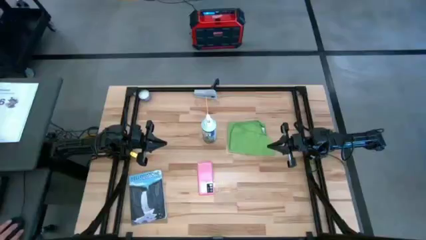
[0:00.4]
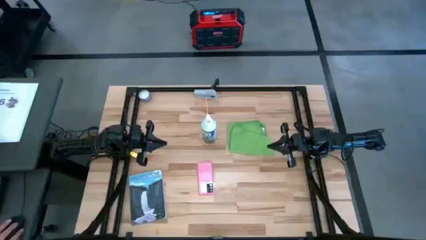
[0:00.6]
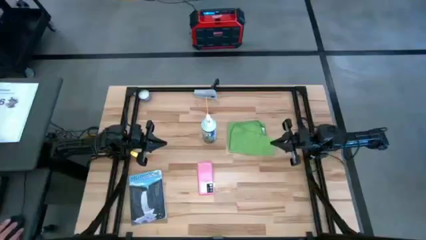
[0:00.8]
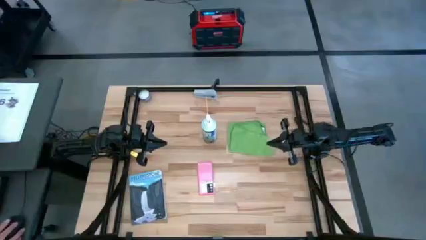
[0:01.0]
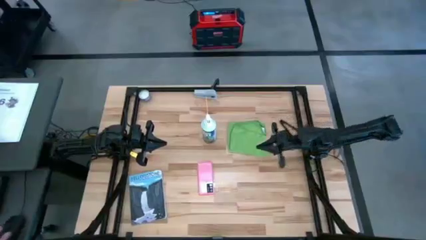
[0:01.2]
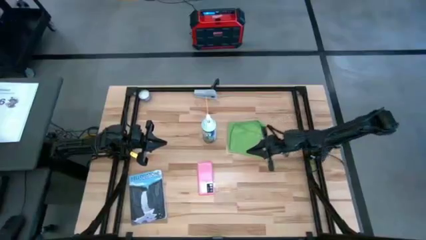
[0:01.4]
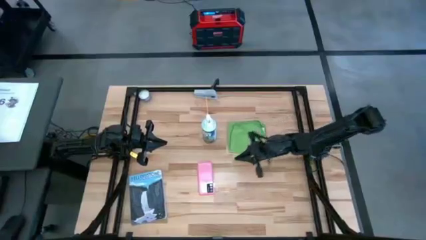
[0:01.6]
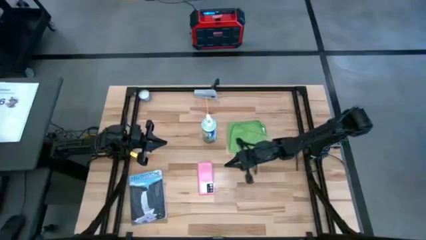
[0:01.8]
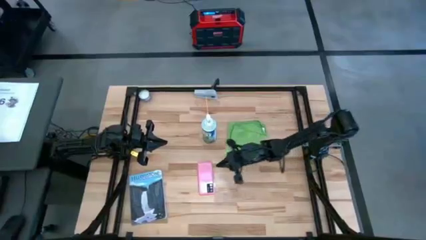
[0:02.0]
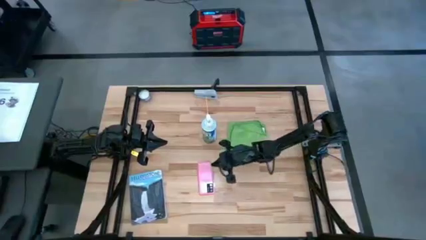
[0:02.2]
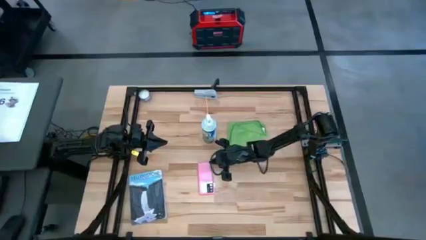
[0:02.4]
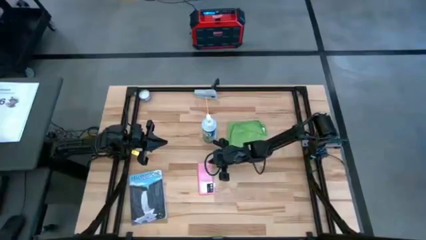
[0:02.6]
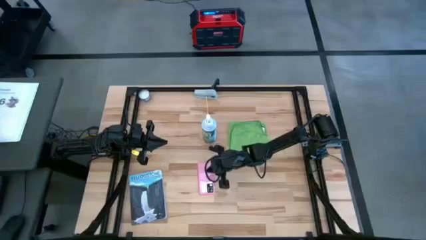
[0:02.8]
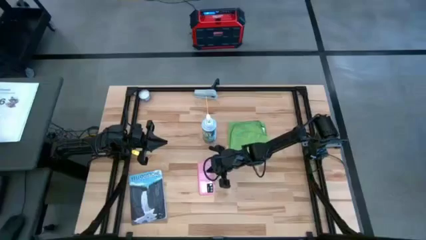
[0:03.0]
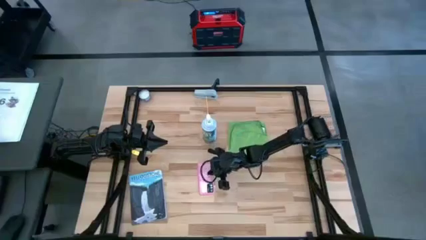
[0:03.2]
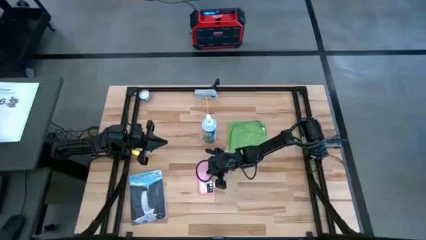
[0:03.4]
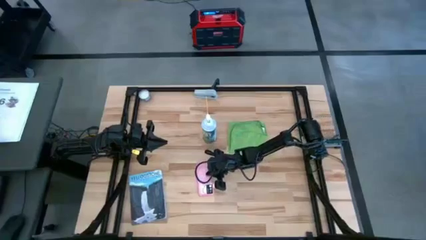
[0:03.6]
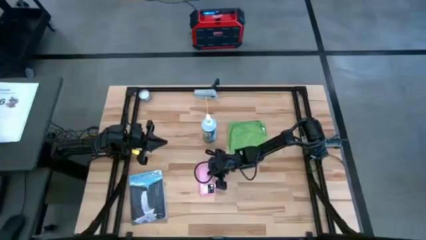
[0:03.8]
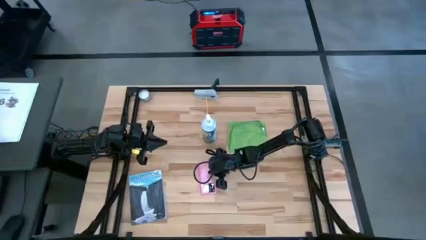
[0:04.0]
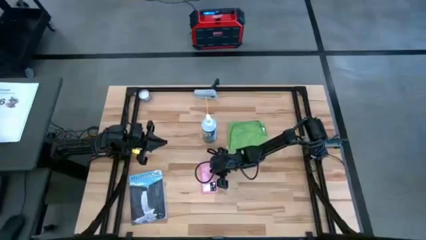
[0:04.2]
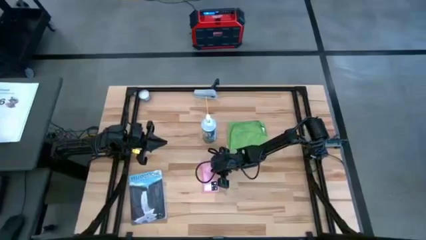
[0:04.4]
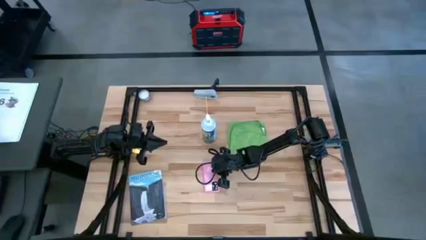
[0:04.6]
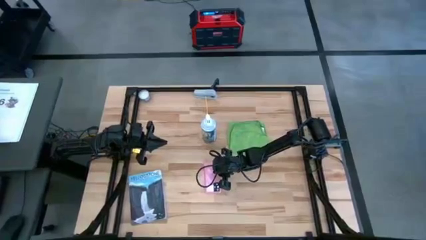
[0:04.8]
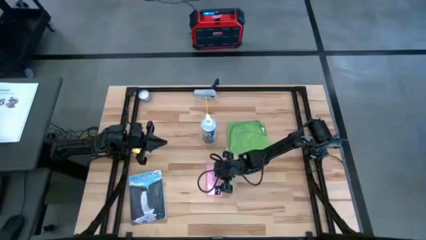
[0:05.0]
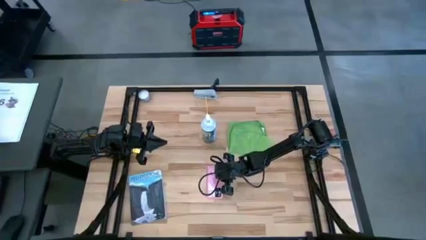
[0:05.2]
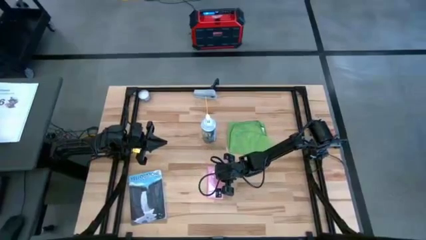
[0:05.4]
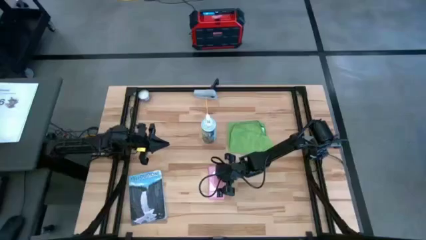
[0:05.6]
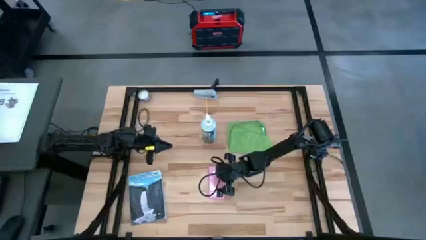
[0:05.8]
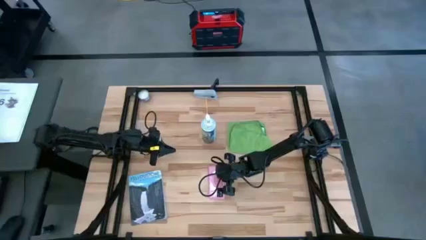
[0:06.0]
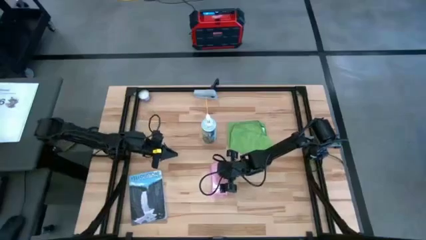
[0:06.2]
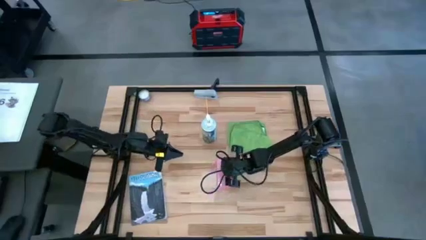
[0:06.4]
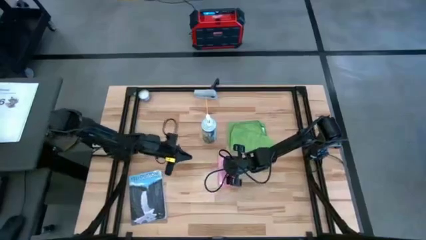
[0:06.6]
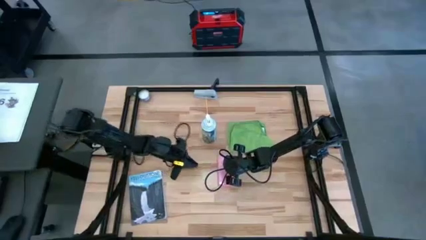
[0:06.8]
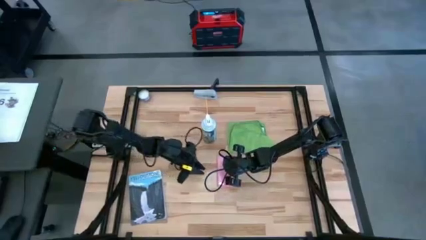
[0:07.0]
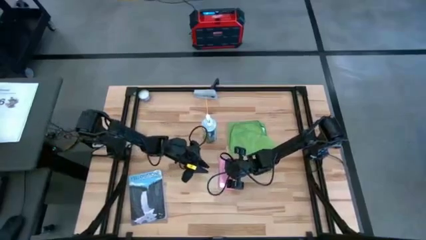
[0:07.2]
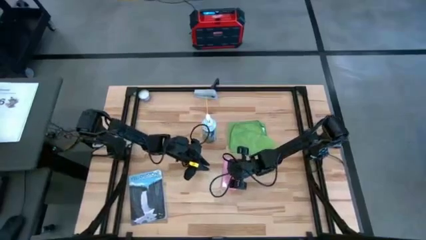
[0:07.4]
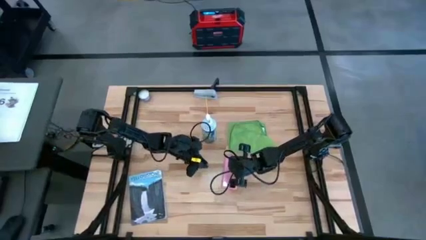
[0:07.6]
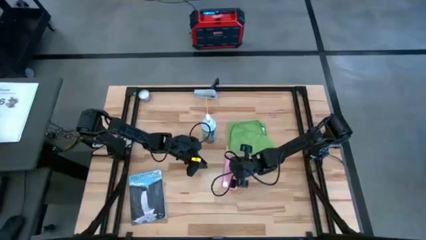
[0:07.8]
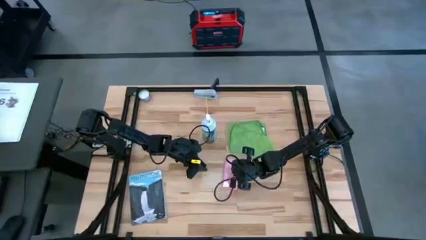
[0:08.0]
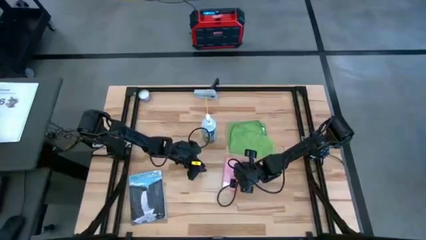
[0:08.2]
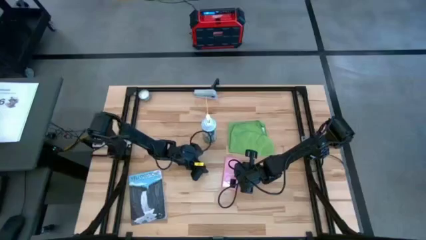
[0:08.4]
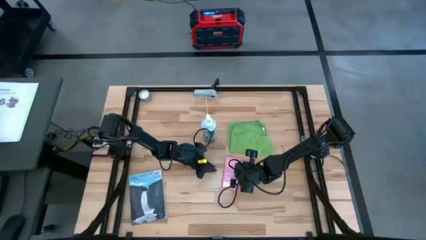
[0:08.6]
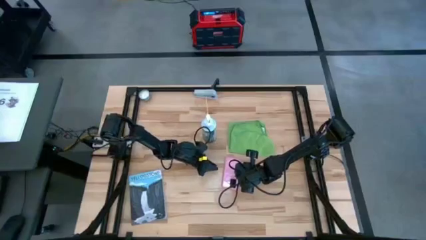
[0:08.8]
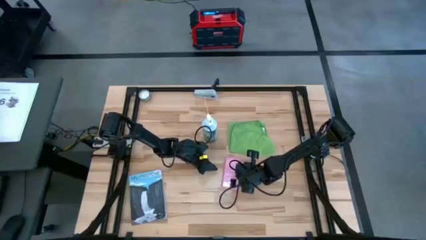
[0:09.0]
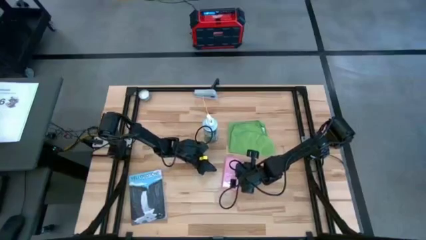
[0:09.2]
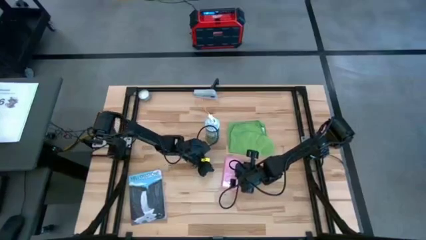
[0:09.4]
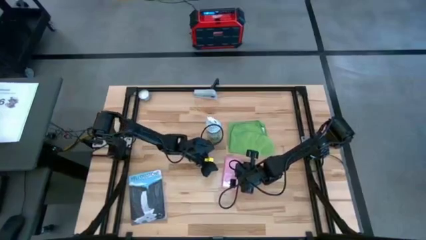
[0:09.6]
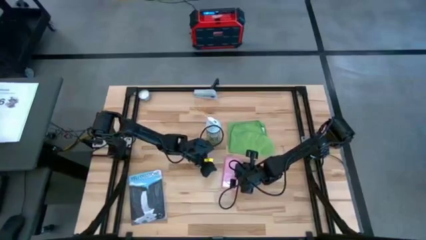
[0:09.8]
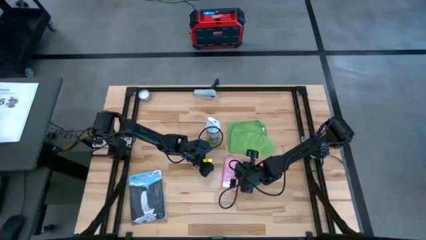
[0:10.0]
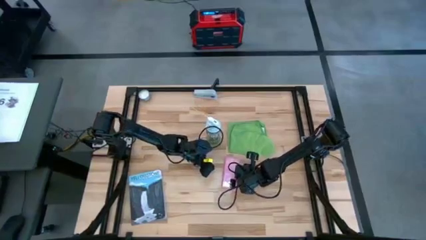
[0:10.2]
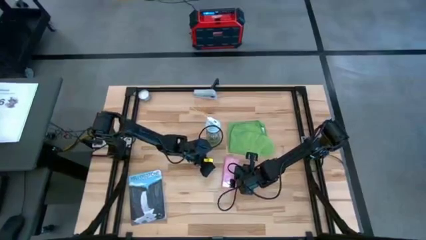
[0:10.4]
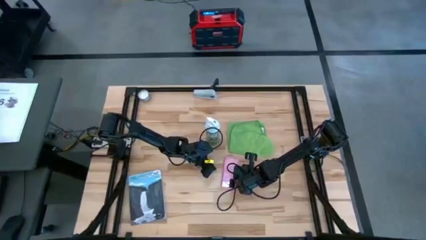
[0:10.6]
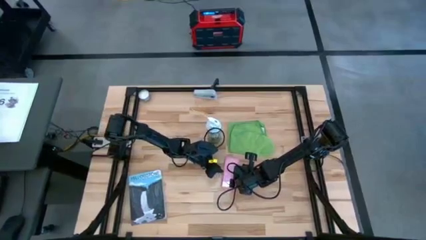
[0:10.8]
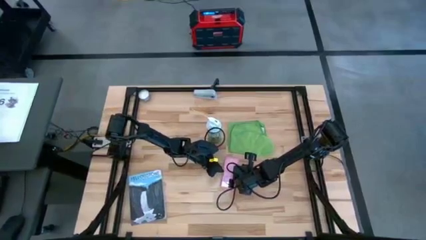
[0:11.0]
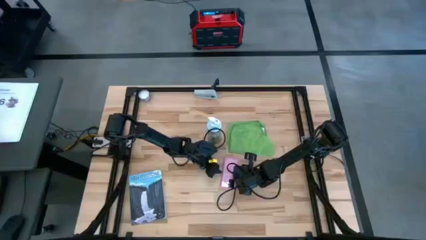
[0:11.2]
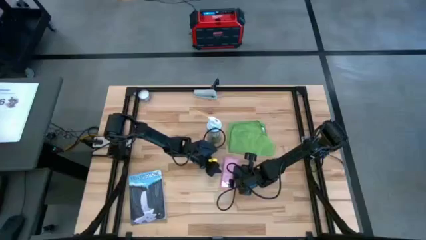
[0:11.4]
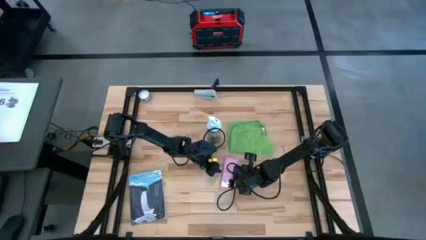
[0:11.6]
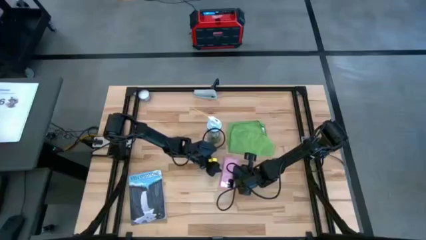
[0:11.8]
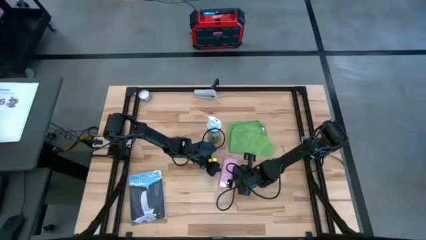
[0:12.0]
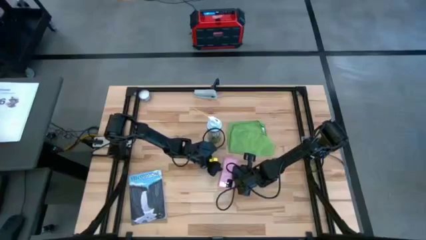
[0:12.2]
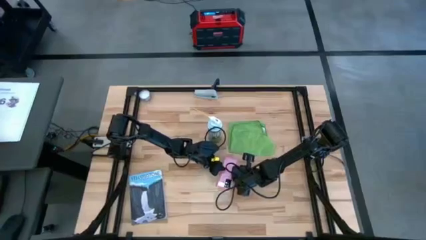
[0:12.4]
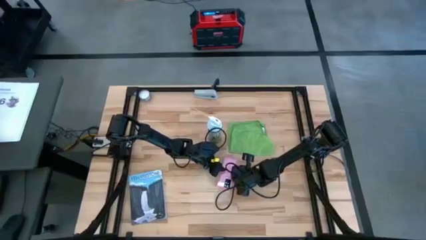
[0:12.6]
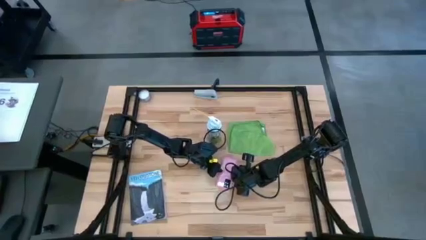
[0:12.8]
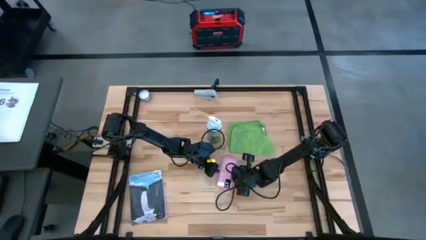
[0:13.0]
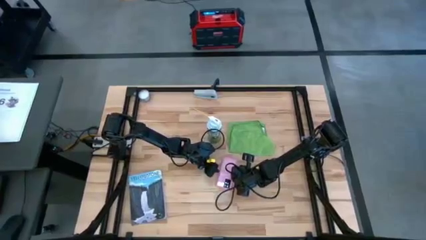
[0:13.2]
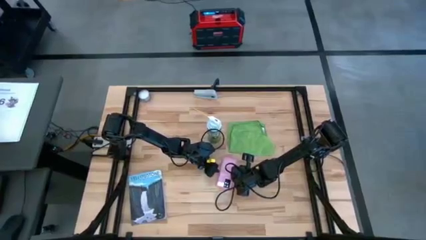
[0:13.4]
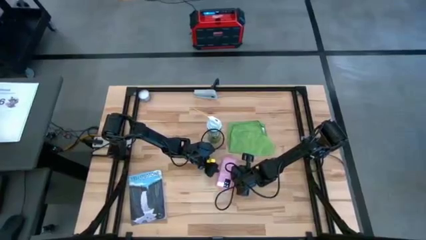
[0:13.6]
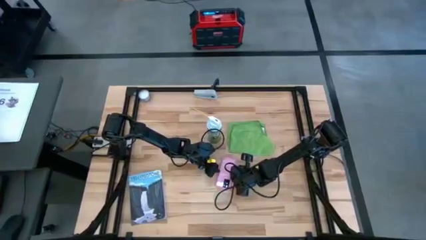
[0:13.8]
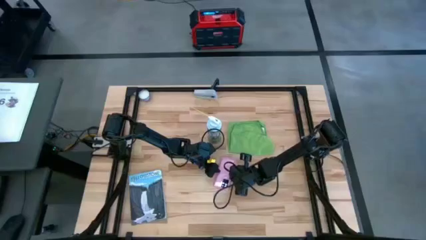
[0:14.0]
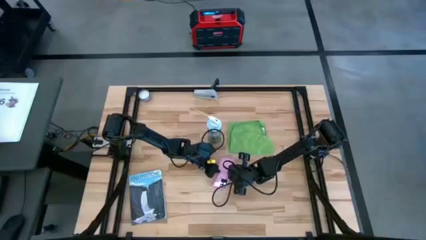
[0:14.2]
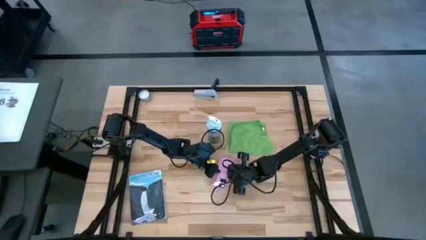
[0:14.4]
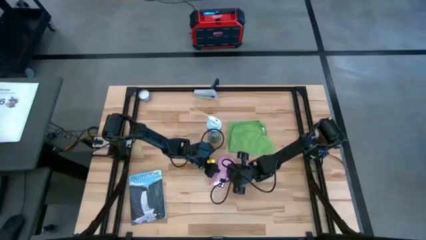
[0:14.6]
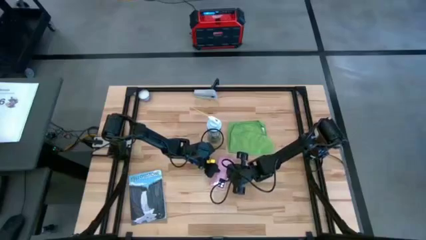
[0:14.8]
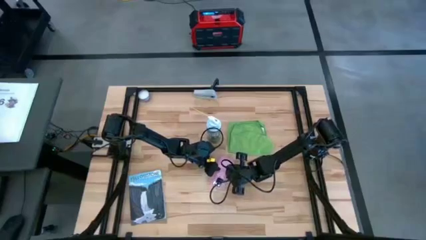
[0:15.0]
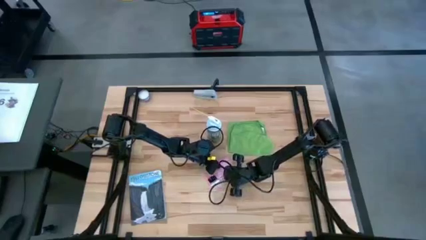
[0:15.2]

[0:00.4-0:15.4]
Task: Apply microfiber cloth
Spray the pink cellphone using the spray bottle
